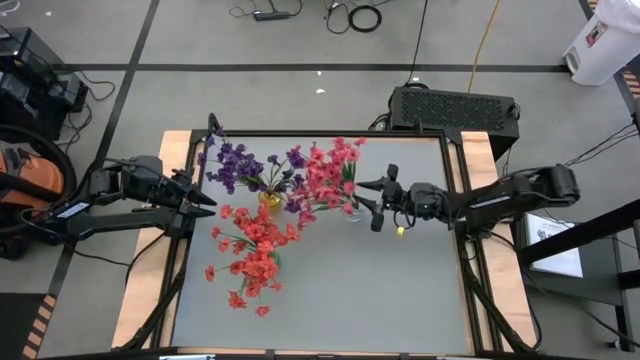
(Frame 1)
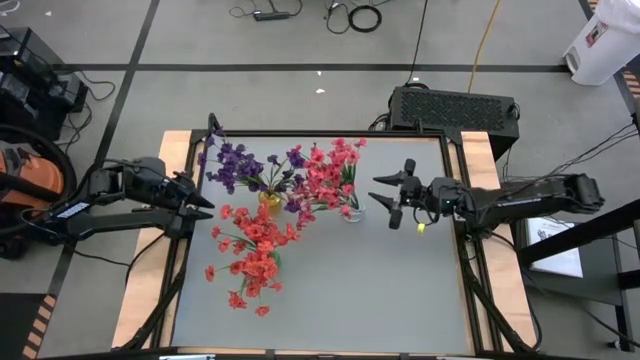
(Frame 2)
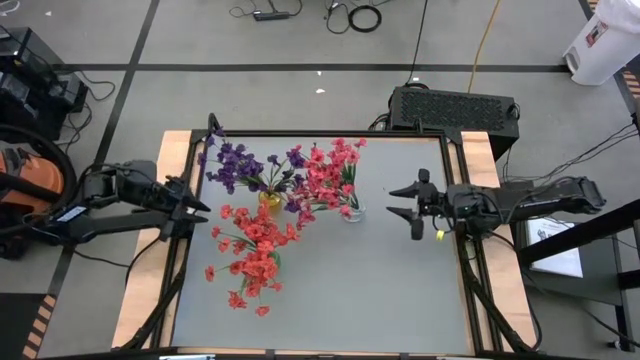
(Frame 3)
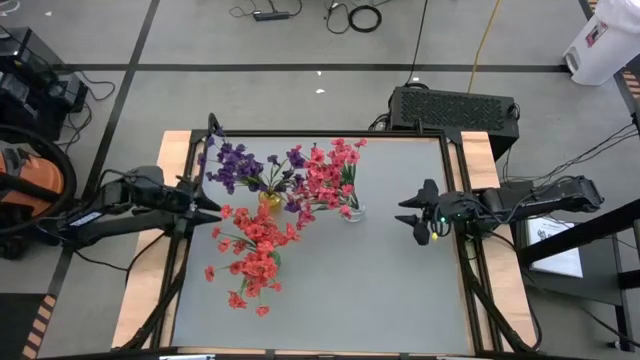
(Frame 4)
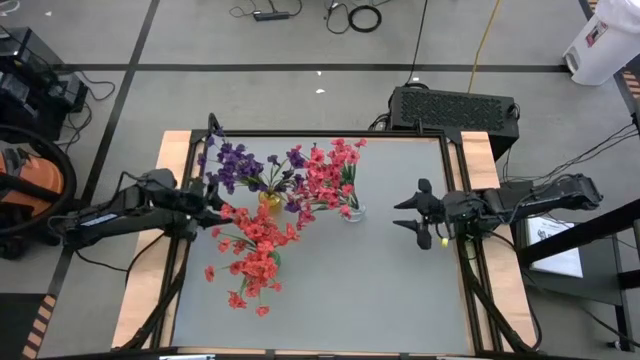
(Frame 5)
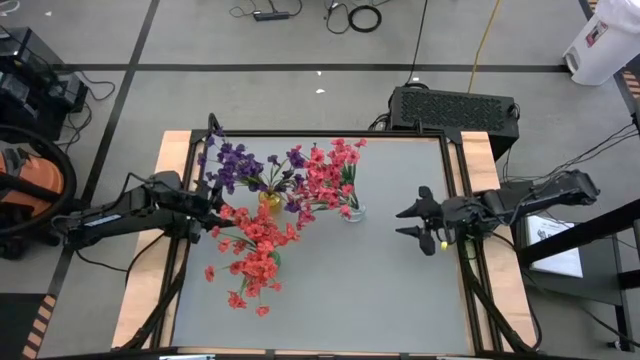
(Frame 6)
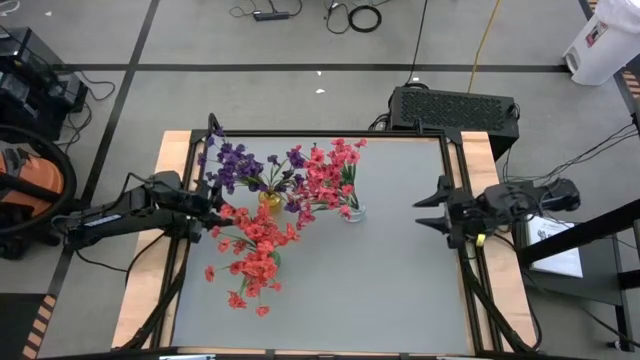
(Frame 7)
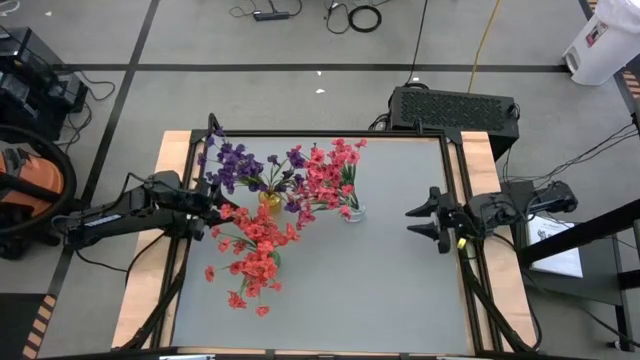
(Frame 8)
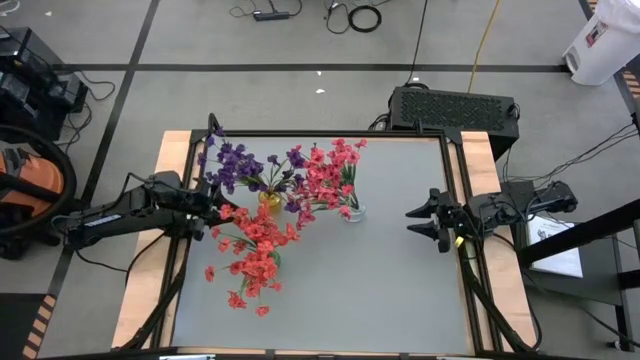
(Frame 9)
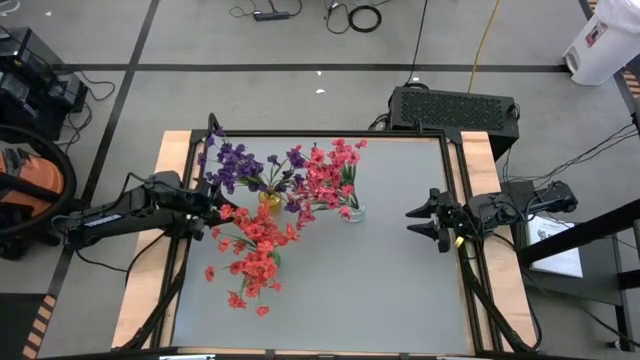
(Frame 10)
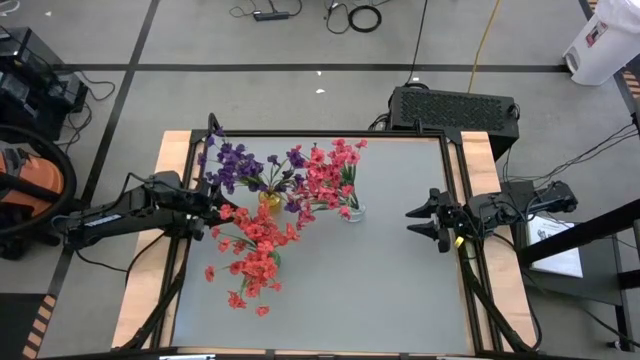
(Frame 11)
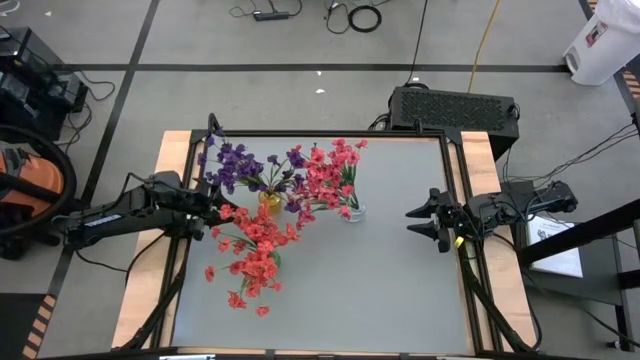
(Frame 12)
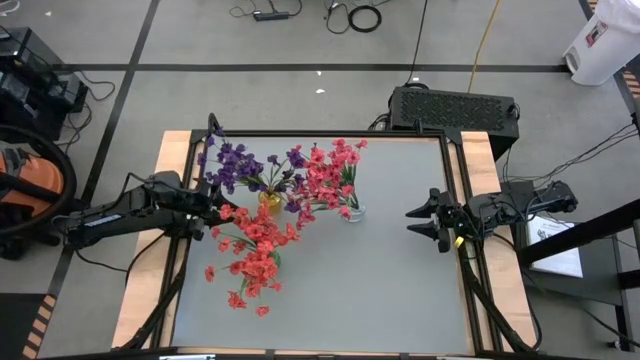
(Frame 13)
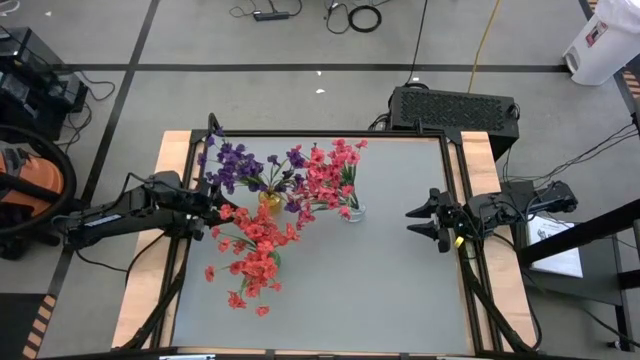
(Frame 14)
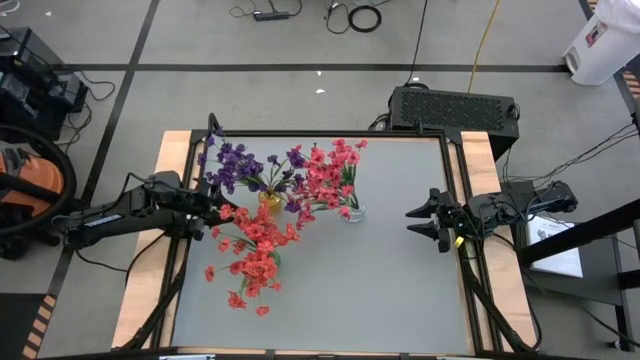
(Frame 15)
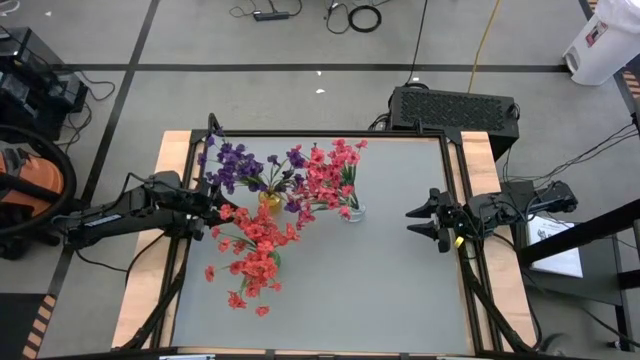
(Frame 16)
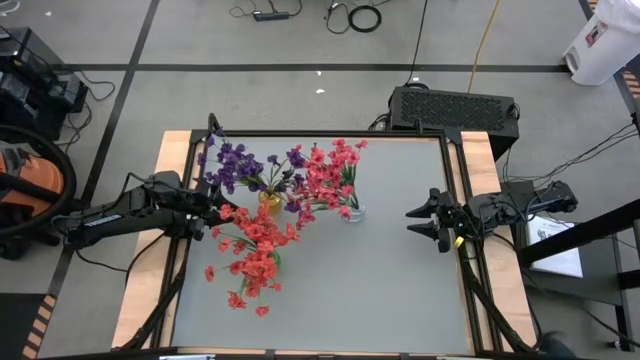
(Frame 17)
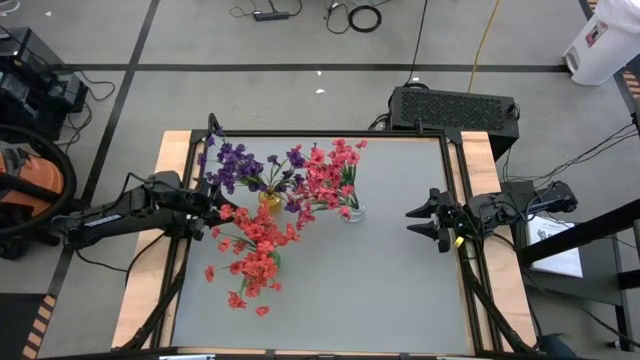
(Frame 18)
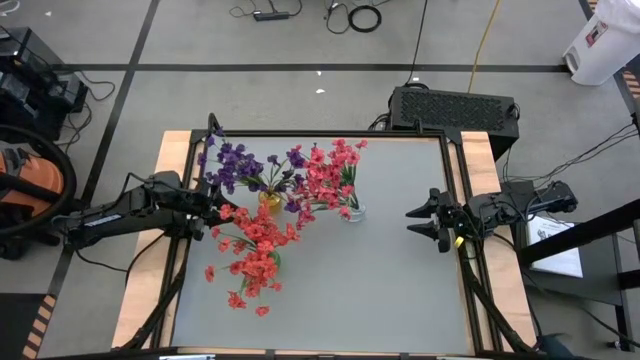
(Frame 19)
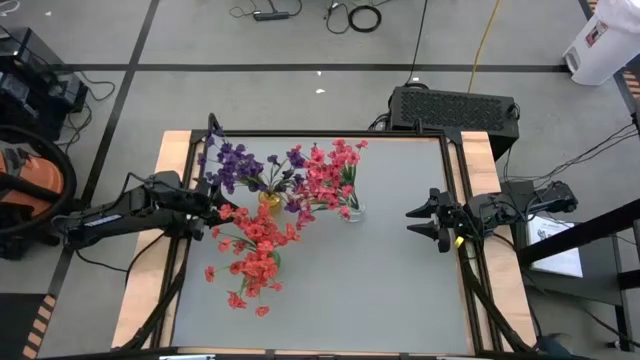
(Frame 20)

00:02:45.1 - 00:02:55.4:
Task: Sort flowers into vase by color
Return to Home Position

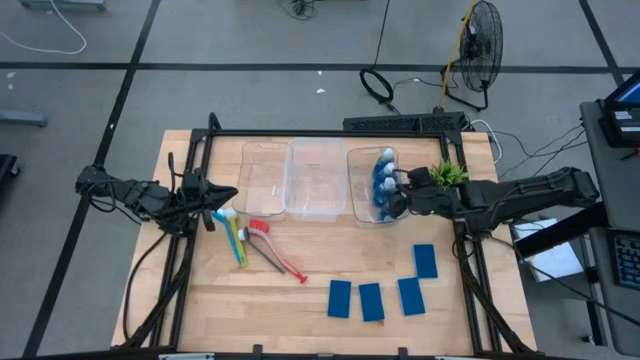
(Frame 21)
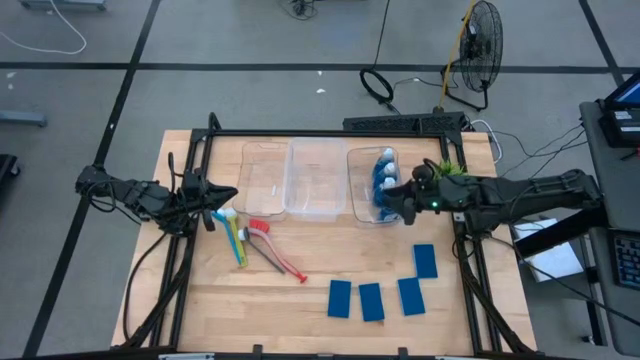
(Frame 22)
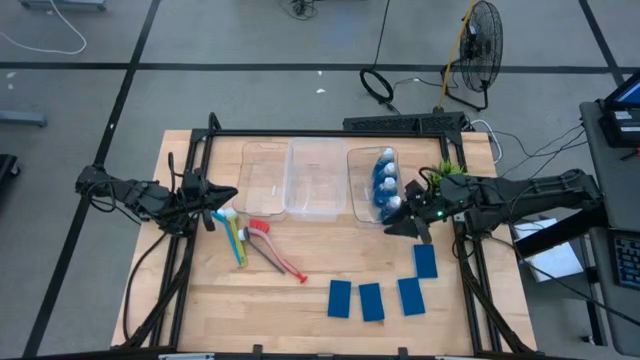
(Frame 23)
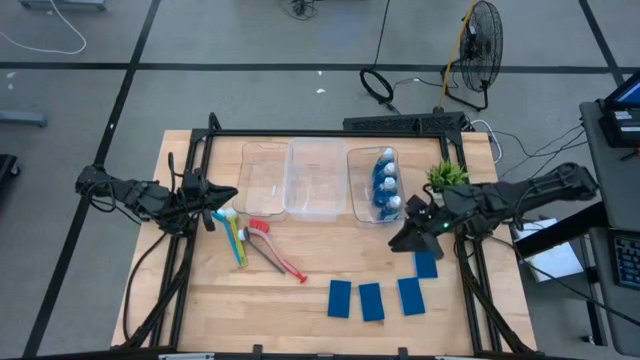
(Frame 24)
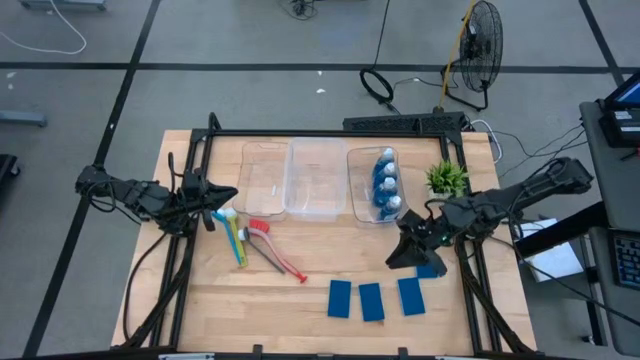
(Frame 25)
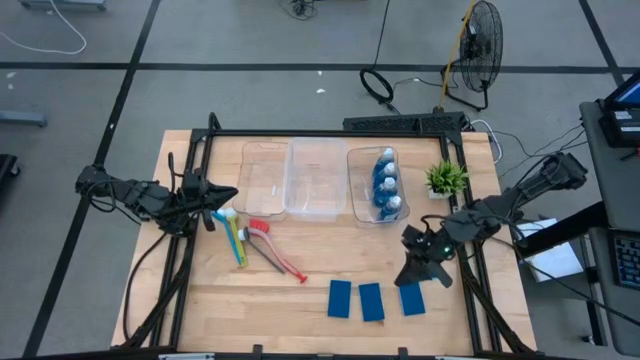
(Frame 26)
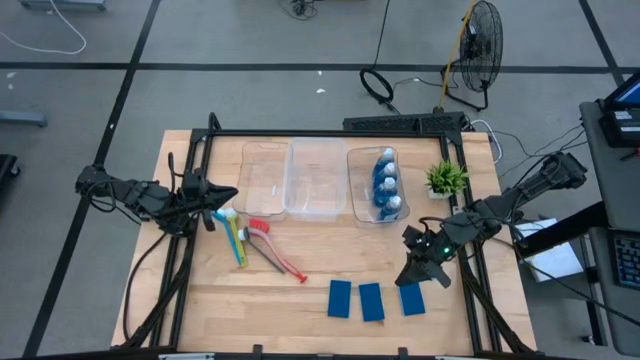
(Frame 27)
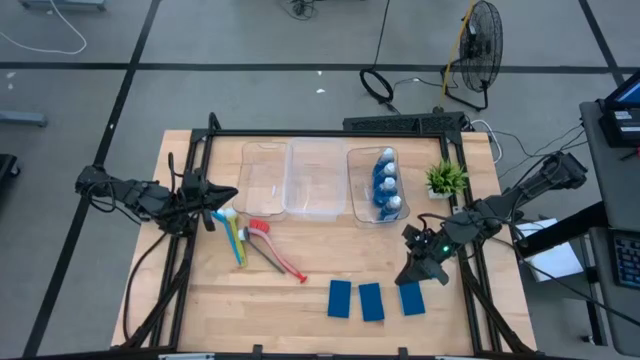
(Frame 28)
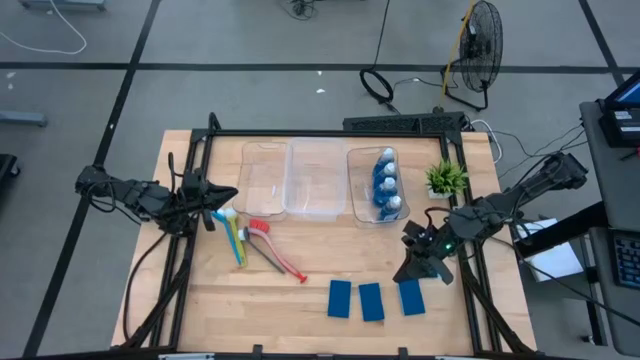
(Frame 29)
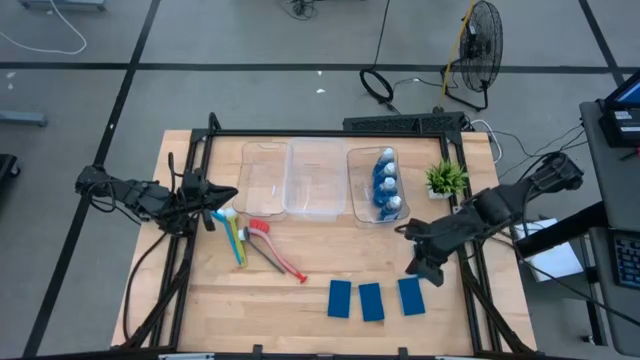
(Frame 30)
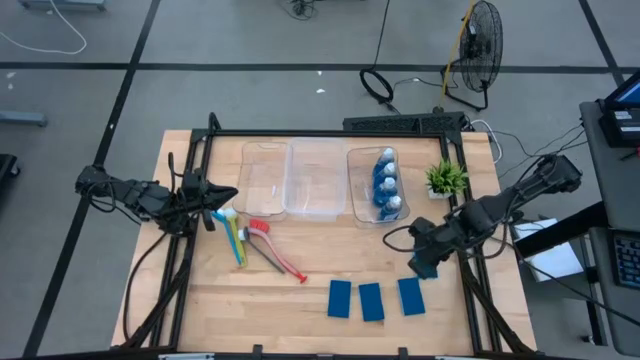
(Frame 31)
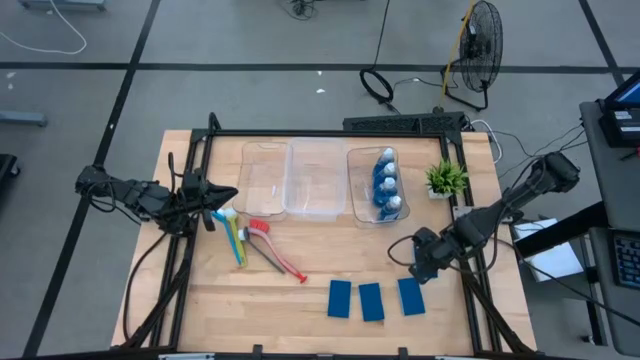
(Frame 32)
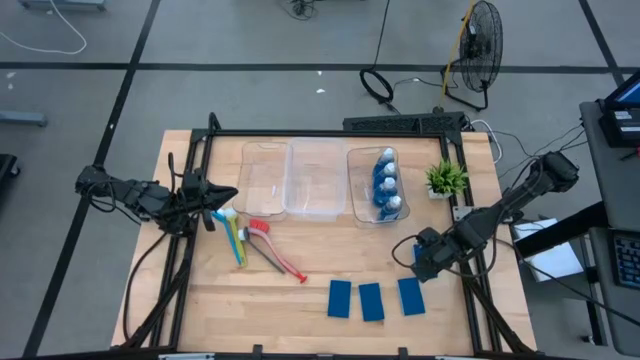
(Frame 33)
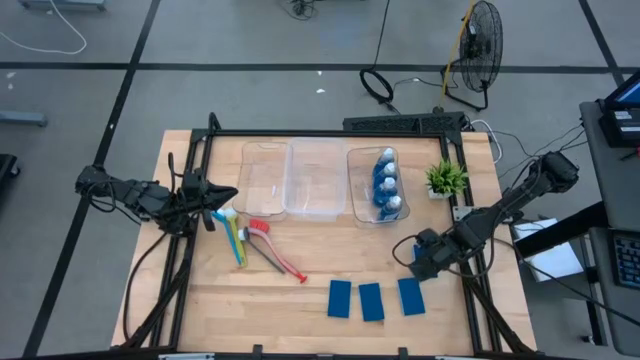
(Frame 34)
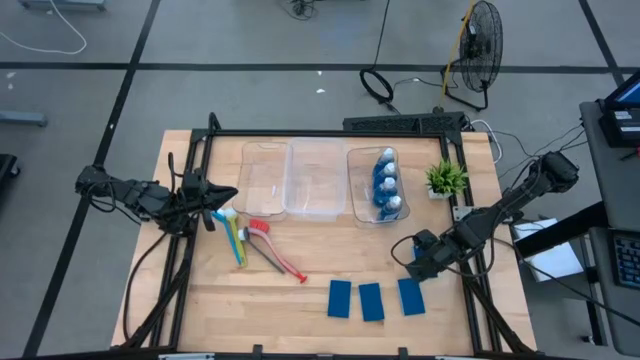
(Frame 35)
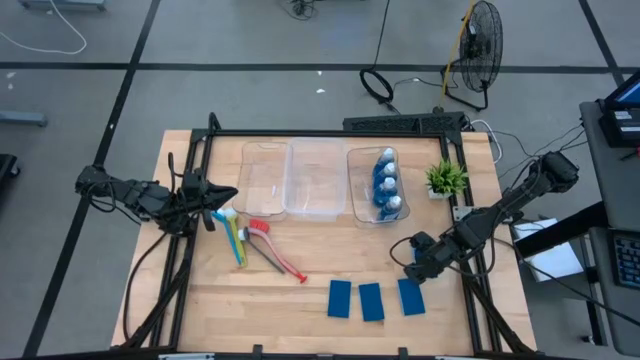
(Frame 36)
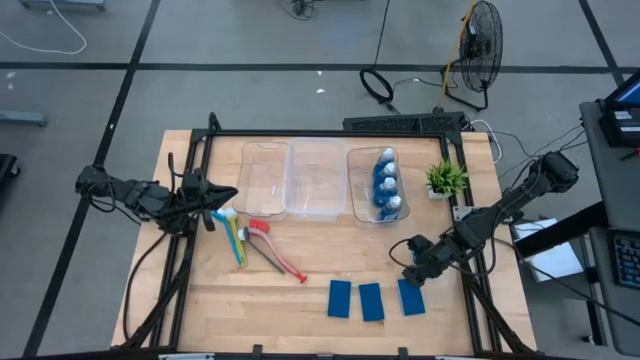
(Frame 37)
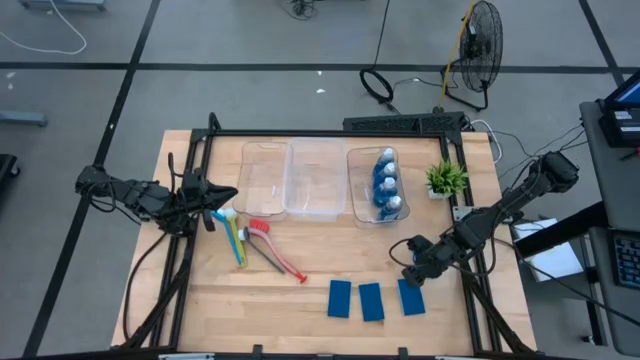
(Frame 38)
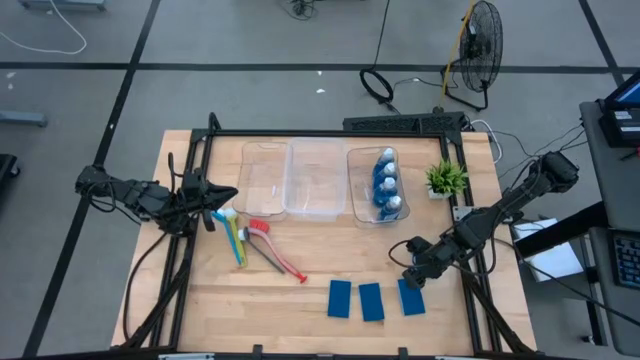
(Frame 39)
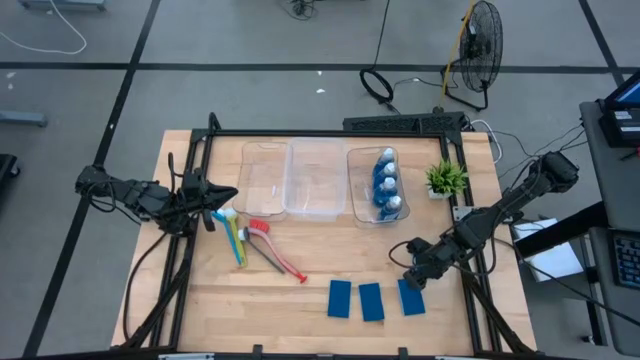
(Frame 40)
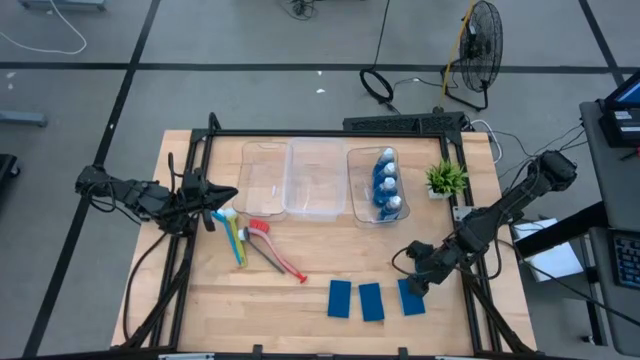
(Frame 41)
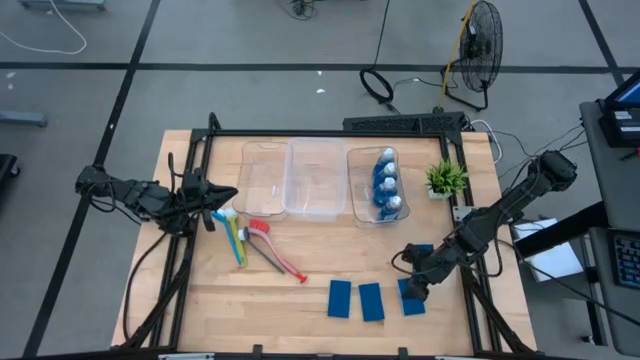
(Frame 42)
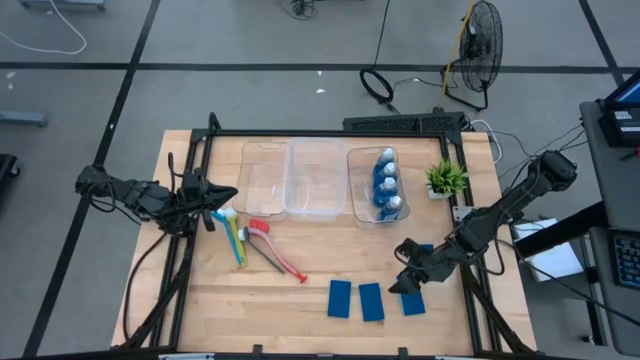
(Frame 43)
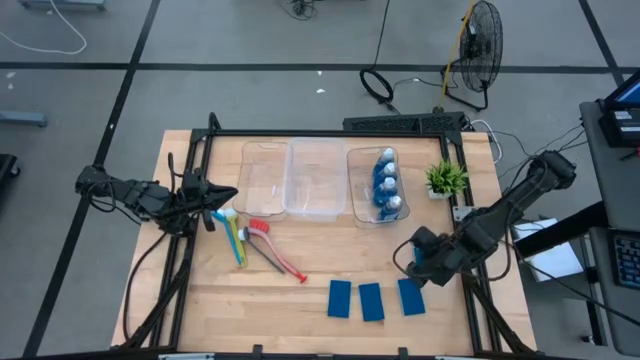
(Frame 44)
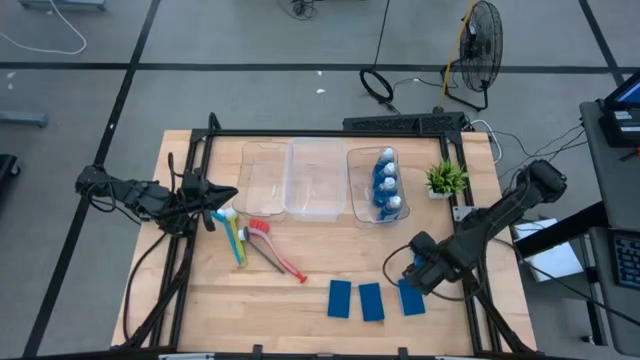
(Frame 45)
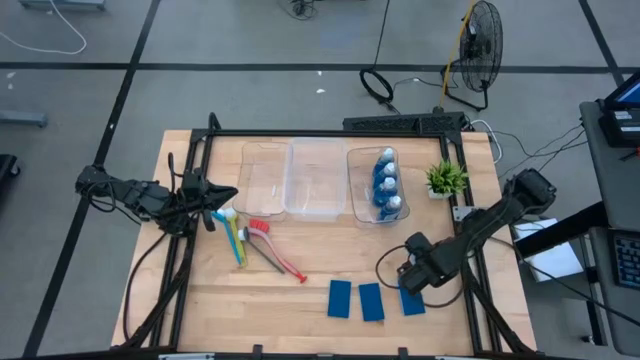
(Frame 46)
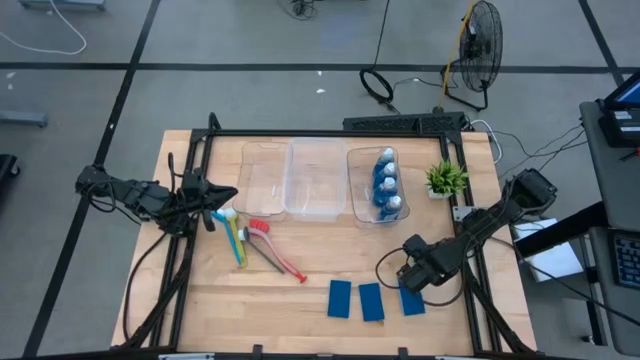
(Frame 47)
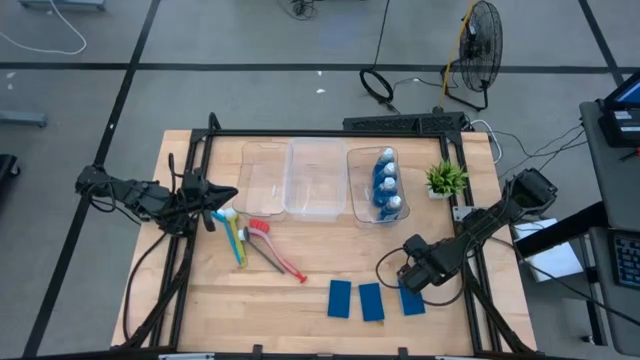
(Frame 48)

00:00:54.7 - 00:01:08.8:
Task: Pick & Place Kitchen Sink Supplies
Put the blue sponge into the left transparent bin
